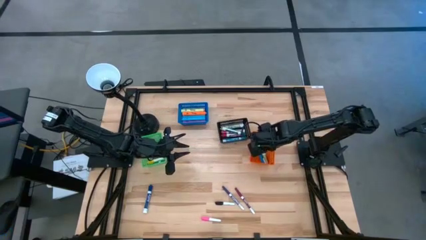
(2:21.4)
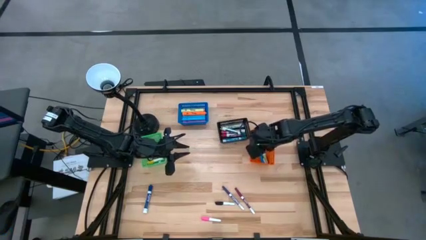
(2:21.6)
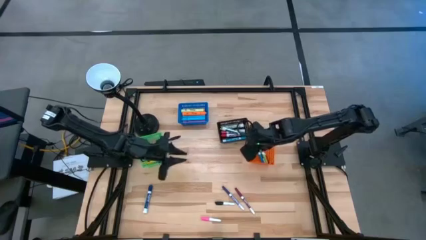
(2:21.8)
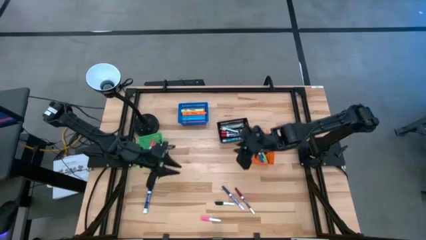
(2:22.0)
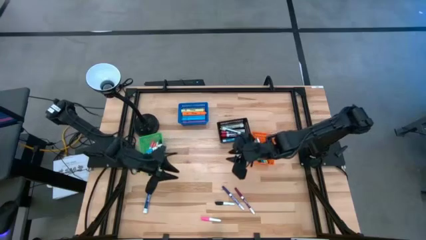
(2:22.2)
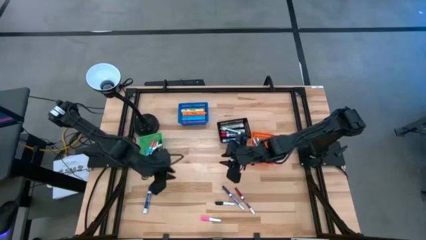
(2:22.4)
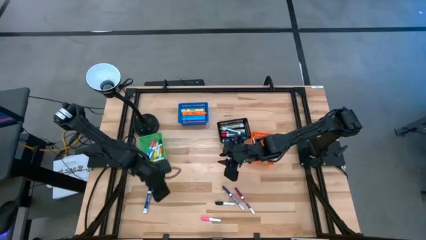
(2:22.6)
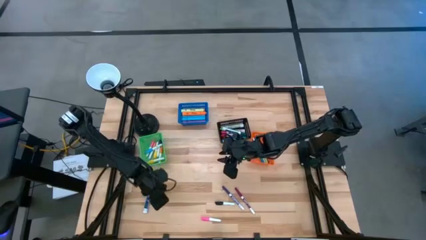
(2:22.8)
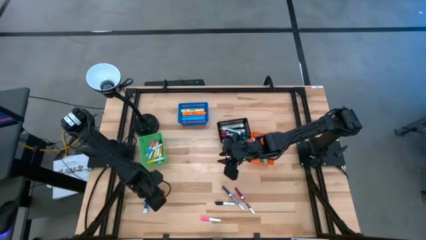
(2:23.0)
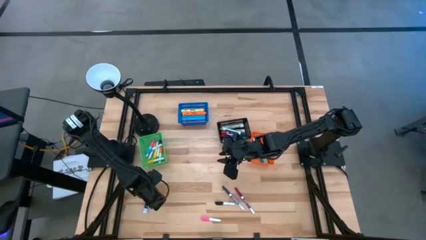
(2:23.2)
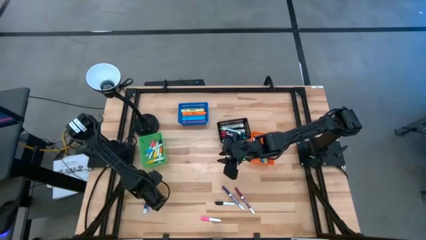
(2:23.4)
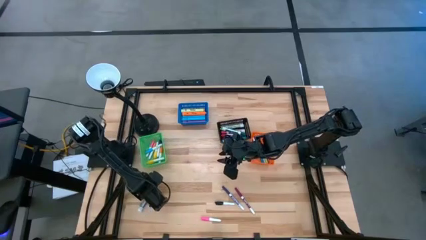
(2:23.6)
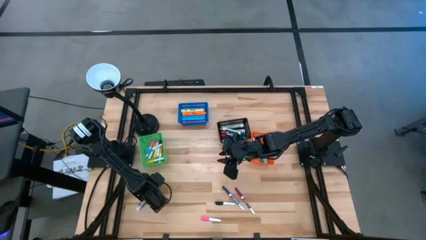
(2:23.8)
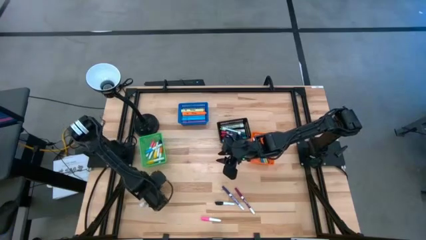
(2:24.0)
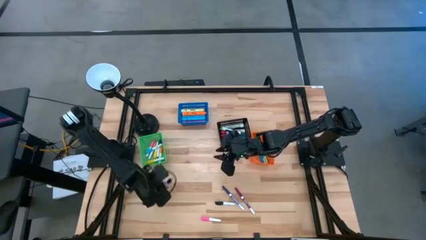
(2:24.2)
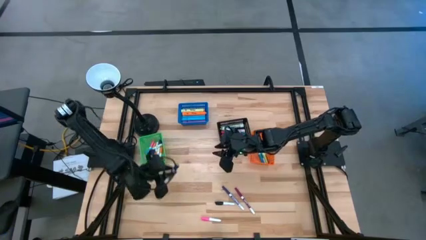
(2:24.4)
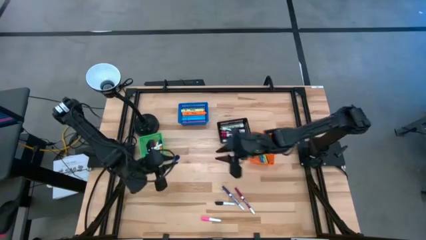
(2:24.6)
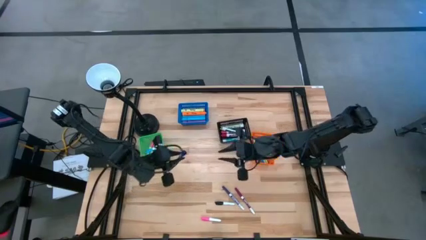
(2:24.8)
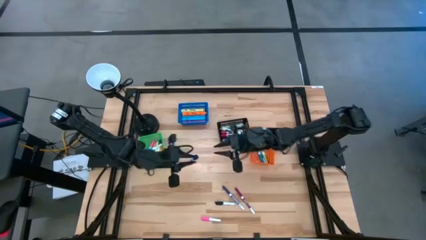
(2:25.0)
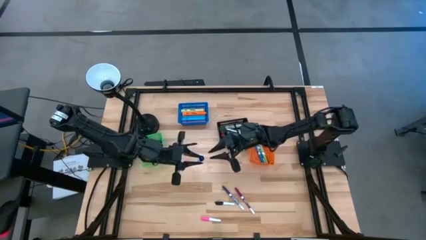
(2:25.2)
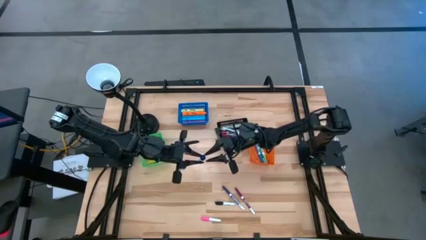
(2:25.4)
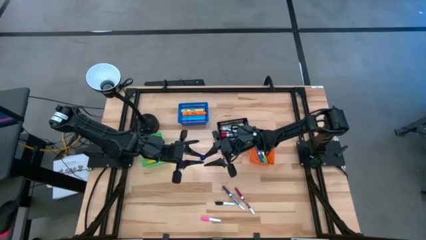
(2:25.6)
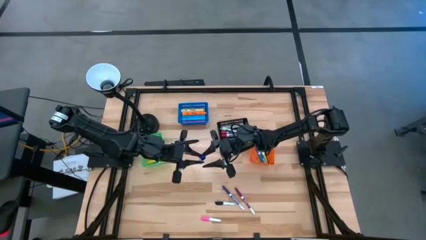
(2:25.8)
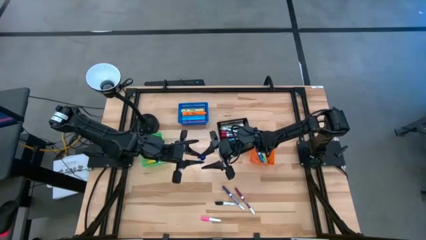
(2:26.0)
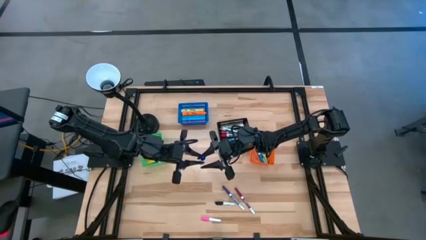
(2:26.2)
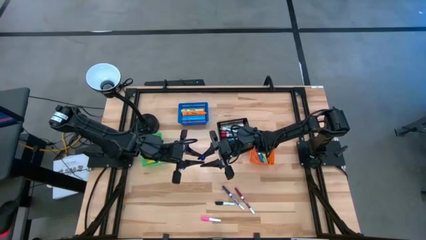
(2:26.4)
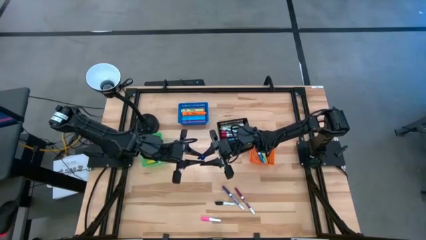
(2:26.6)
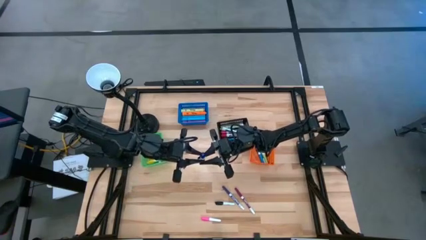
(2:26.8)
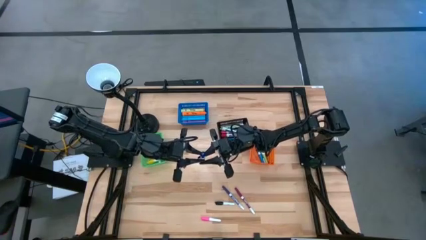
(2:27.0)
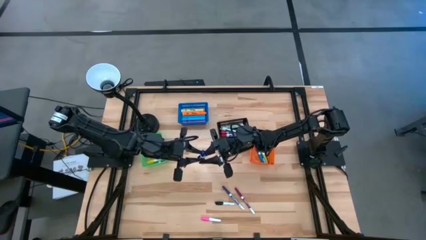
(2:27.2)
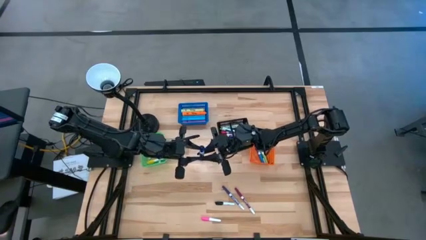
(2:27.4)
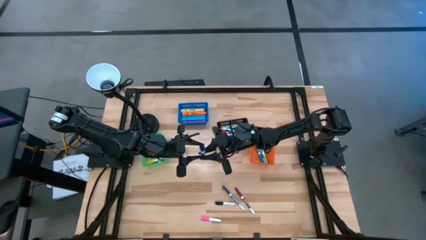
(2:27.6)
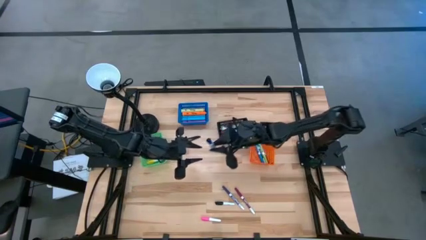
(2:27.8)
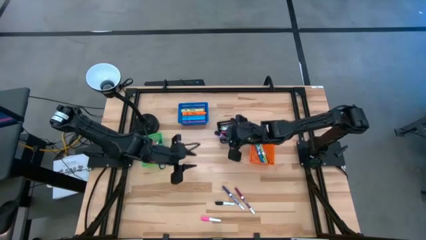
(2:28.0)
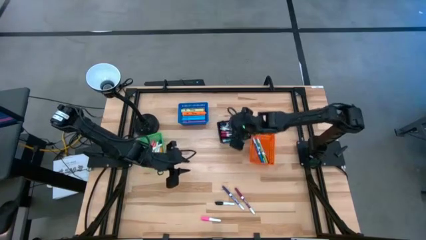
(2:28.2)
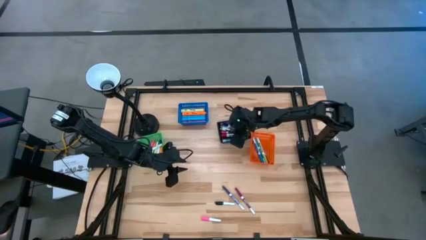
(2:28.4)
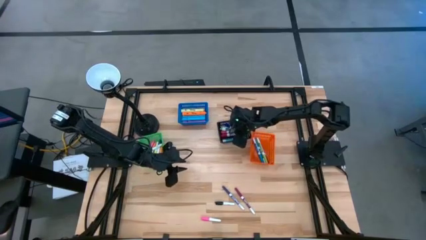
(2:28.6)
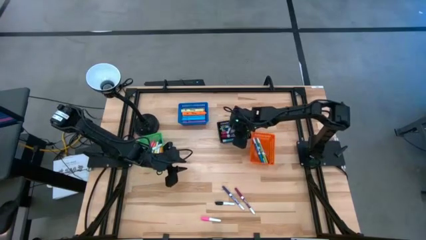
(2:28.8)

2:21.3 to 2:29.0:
Task: Pick & Place Markers
Put the dark blue marker pen into the black basket

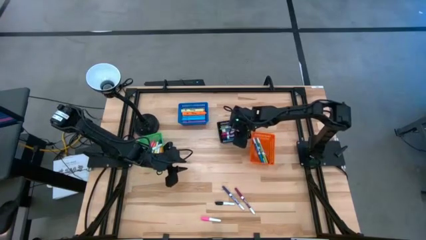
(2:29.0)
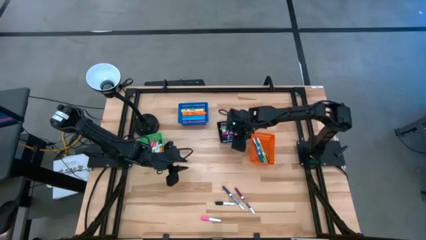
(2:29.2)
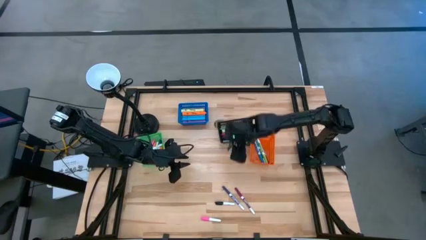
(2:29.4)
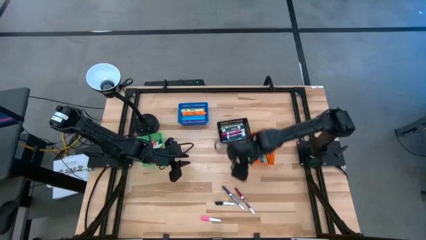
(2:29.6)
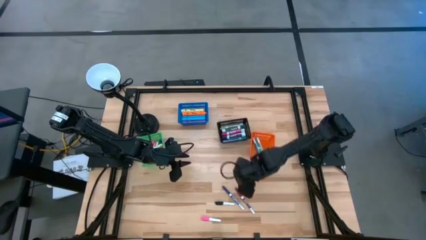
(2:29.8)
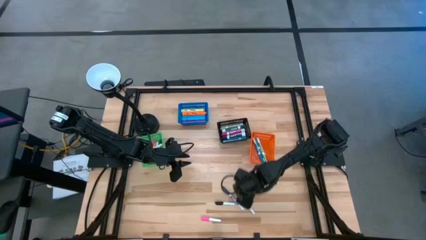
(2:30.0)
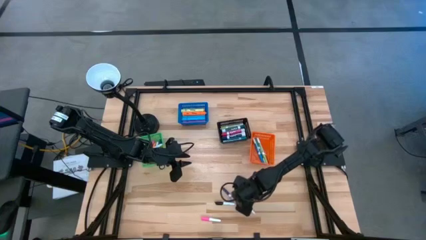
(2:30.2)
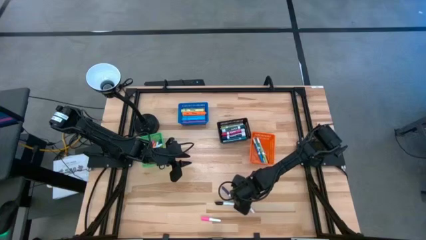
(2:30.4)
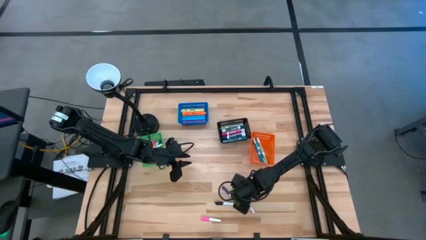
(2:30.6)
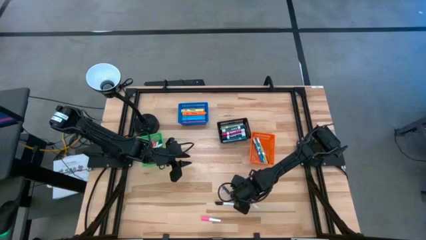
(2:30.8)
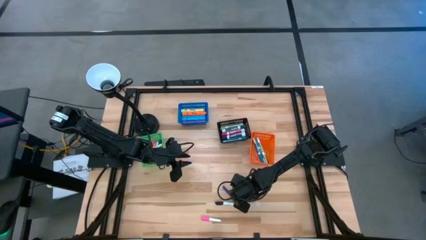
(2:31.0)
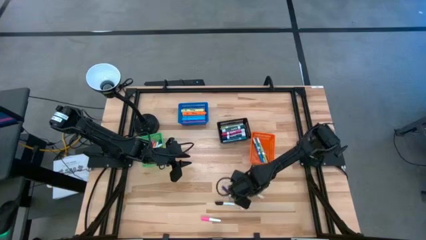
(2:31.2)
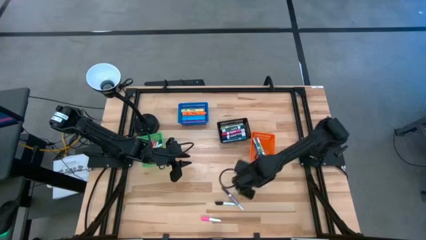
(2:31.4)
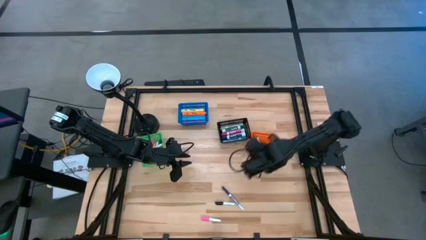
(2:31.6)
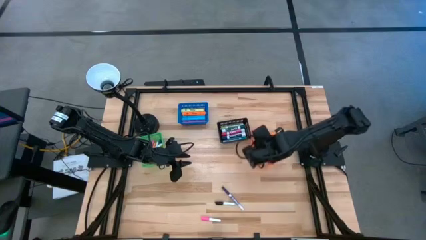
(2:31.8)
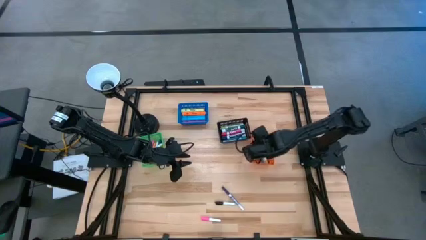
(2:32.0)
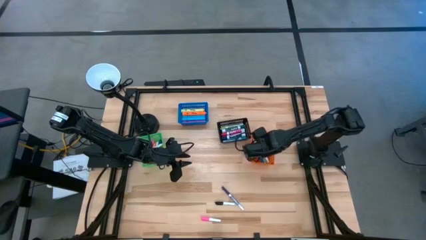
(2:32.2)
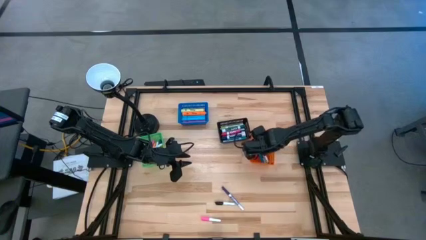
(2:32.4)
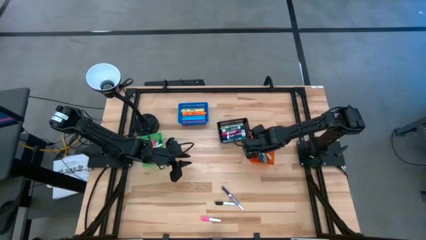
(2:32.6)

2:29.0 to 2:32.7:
Put the violet marker pen into the orange basket

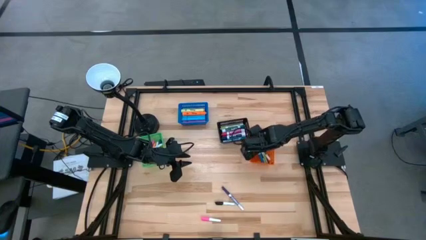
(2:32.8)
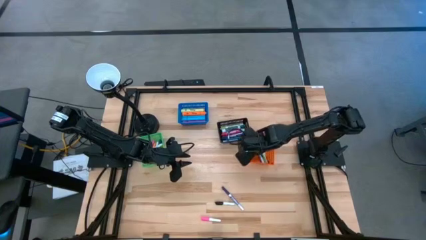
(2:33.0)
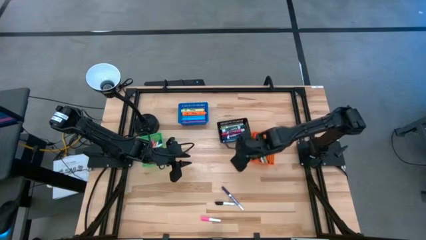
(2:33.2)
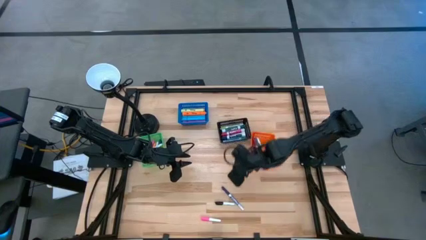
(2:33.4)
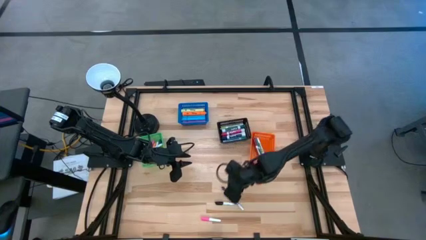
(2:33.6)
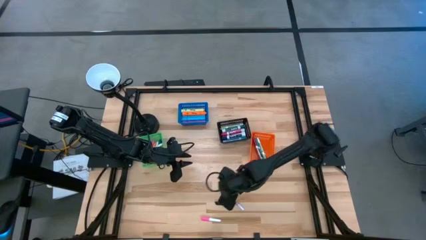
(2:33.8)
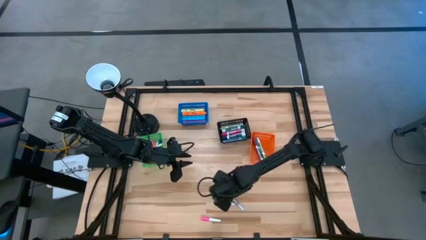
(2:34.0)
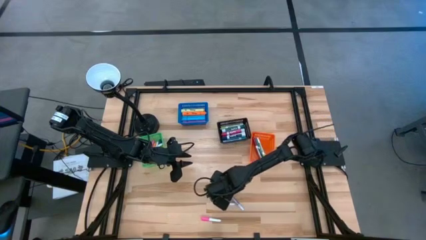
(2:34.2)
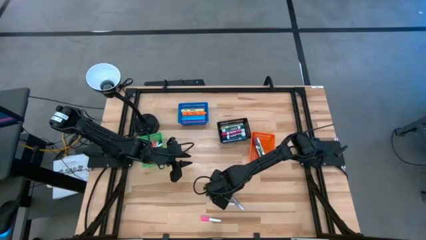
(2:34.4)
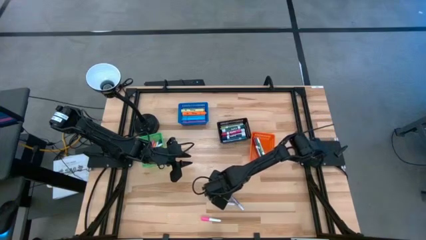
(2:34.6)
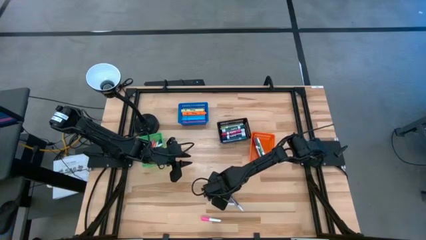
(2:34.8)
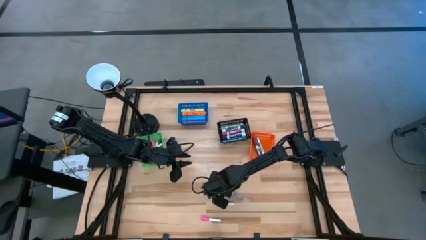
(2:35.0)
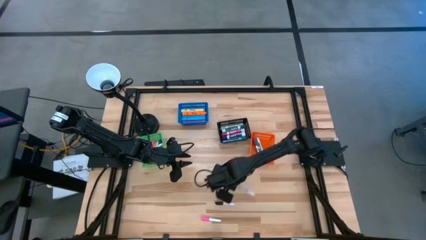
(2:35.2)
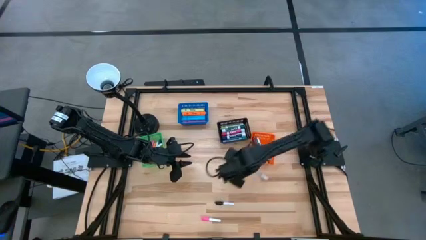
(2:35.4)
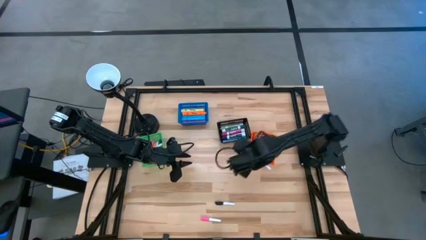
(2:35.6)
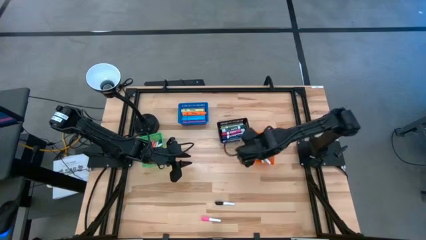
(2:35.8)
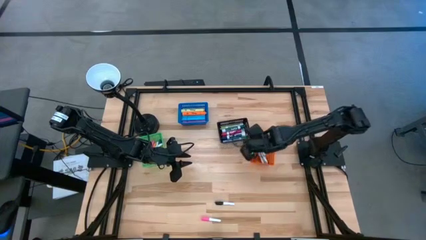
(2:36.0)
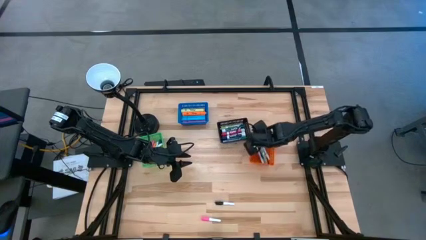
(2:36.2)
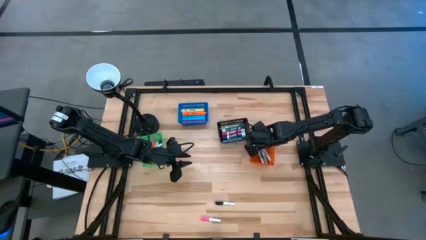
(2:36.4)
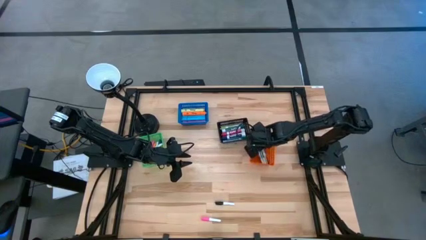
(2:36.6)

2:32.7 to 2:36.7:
Put the dark blue marker pen into the orange basket
